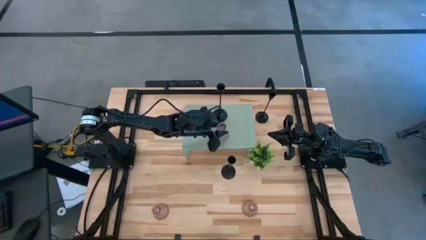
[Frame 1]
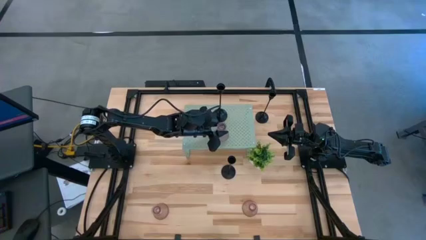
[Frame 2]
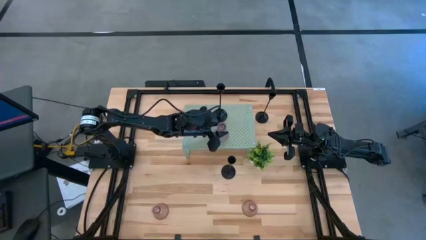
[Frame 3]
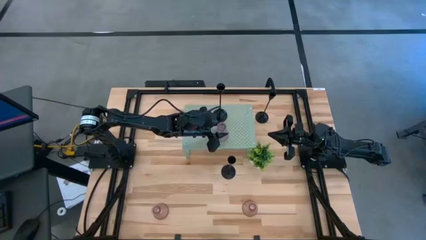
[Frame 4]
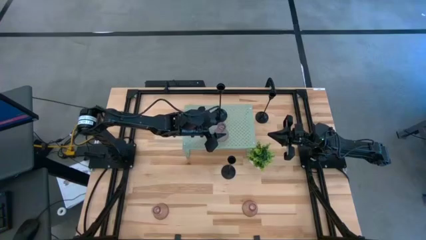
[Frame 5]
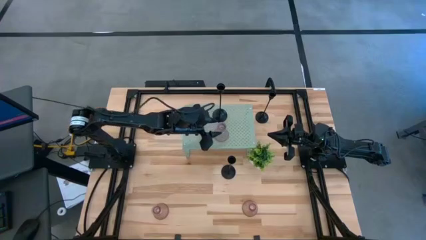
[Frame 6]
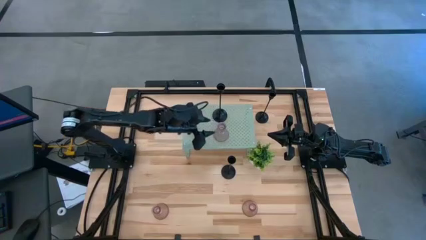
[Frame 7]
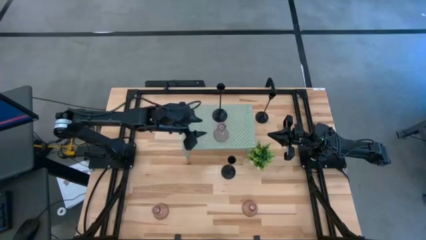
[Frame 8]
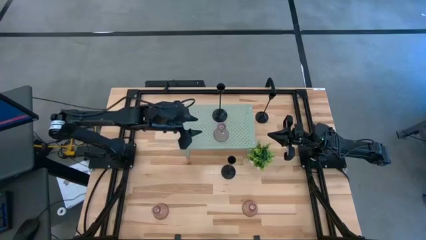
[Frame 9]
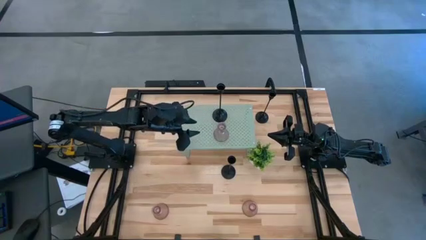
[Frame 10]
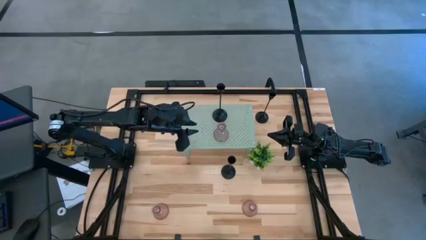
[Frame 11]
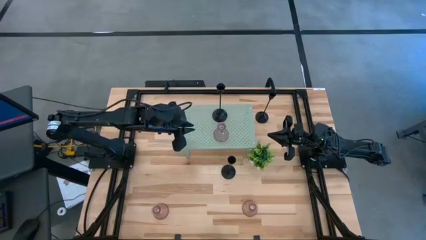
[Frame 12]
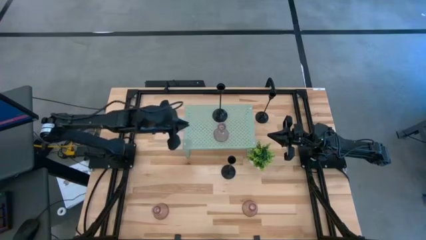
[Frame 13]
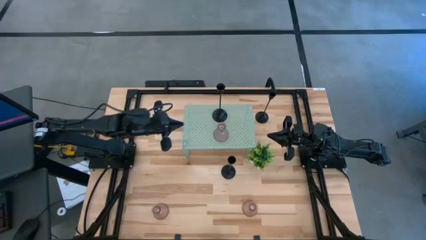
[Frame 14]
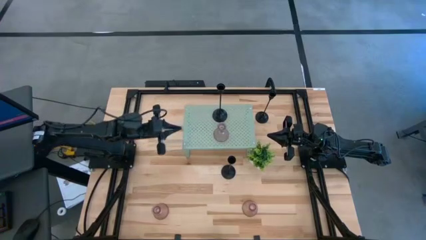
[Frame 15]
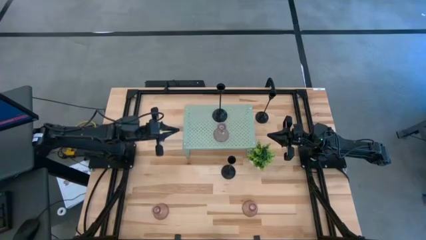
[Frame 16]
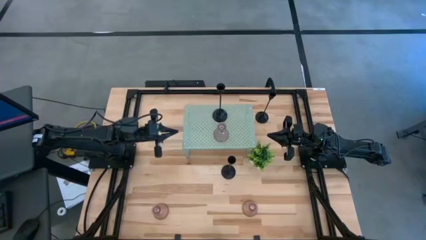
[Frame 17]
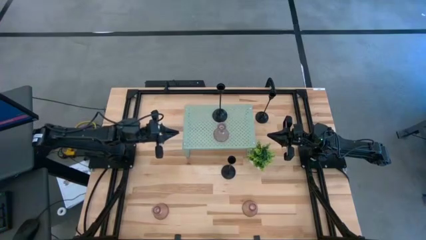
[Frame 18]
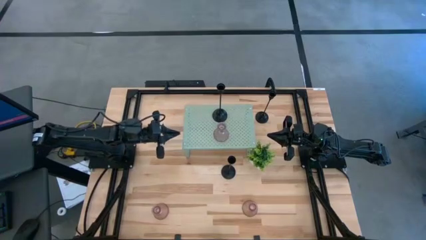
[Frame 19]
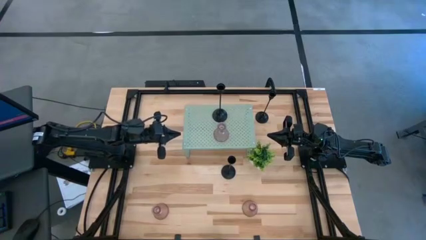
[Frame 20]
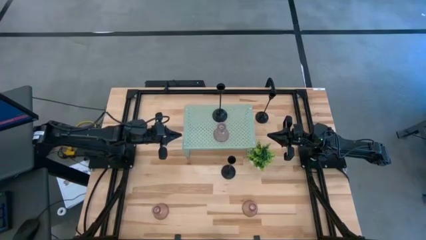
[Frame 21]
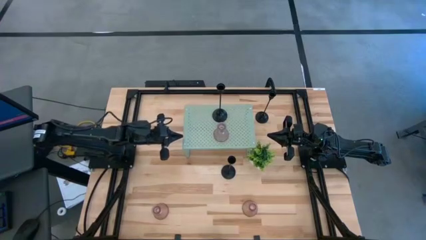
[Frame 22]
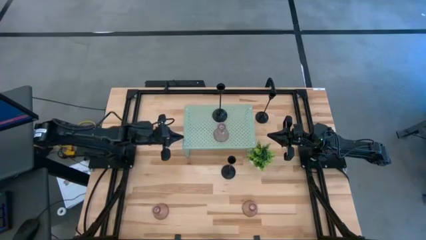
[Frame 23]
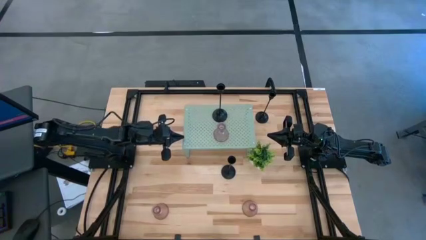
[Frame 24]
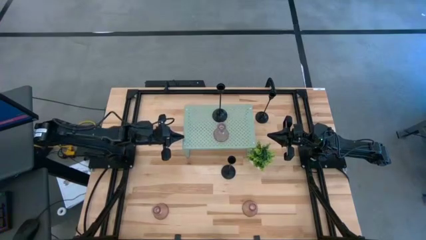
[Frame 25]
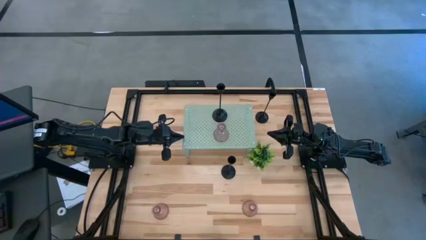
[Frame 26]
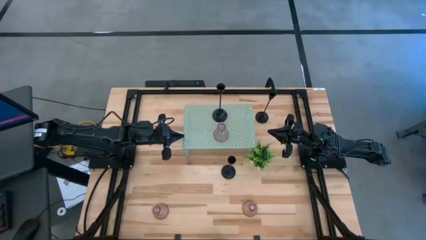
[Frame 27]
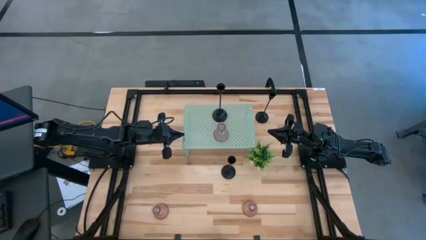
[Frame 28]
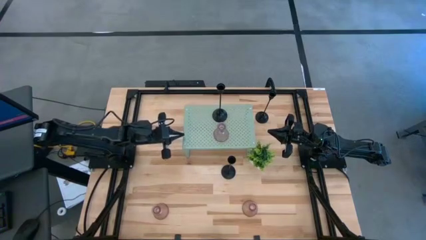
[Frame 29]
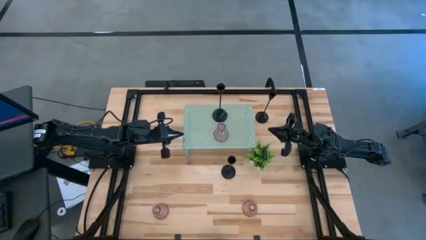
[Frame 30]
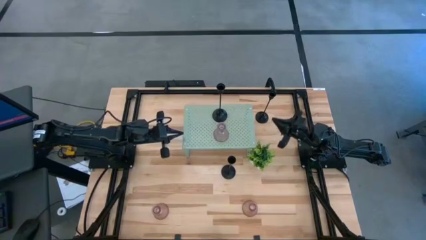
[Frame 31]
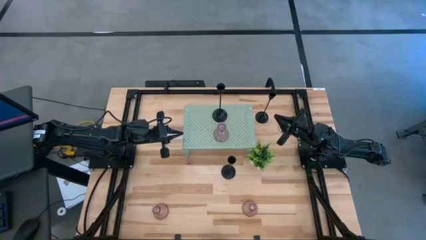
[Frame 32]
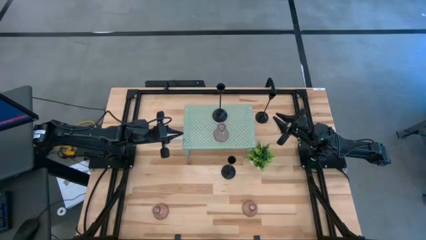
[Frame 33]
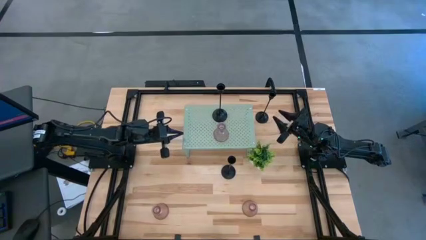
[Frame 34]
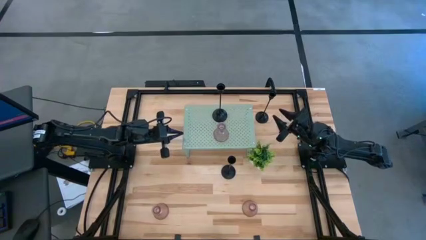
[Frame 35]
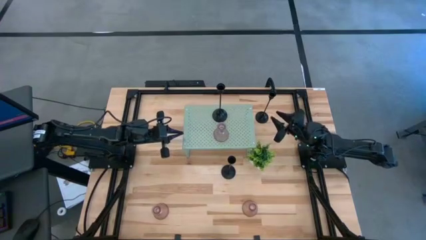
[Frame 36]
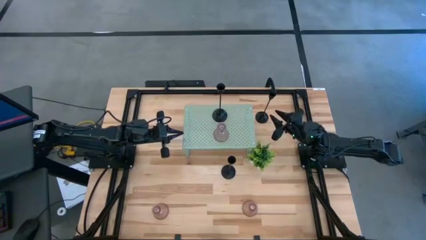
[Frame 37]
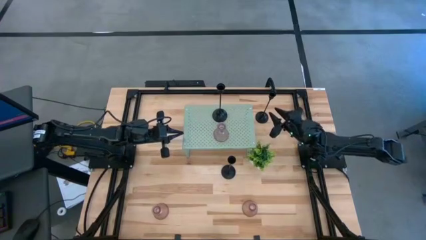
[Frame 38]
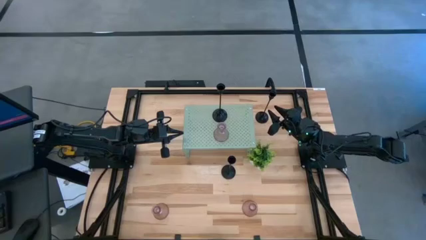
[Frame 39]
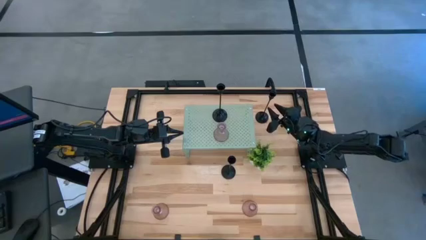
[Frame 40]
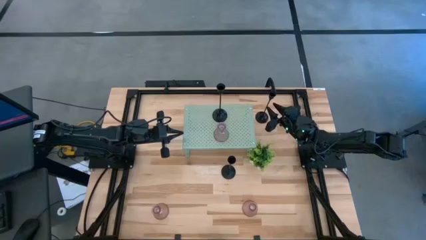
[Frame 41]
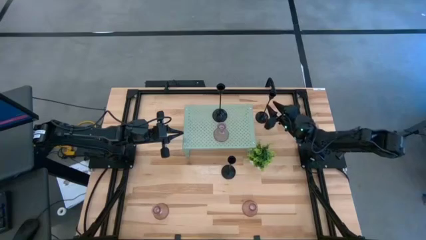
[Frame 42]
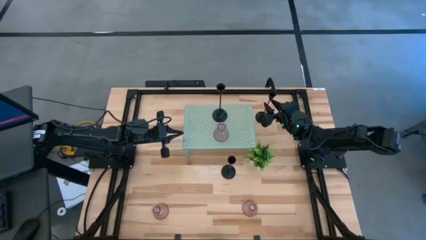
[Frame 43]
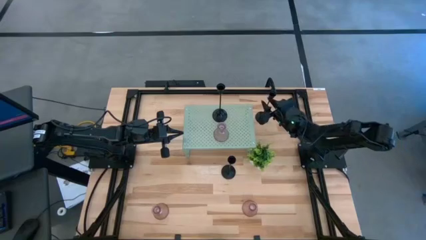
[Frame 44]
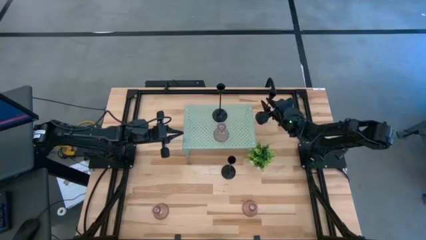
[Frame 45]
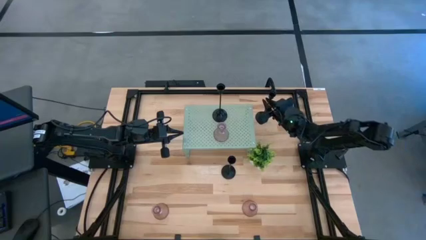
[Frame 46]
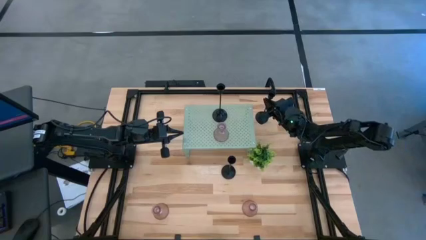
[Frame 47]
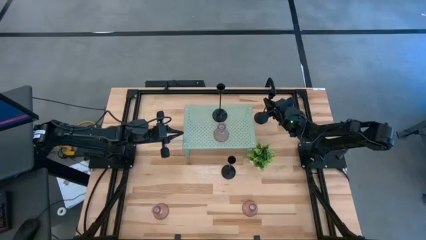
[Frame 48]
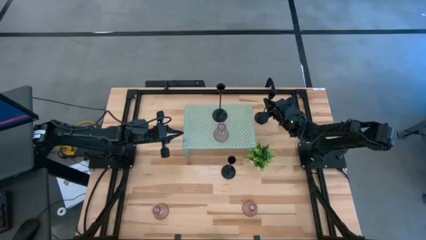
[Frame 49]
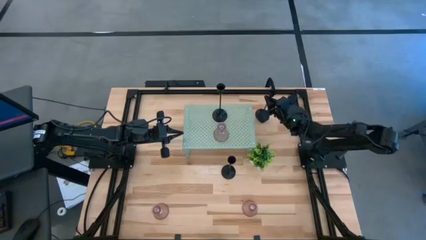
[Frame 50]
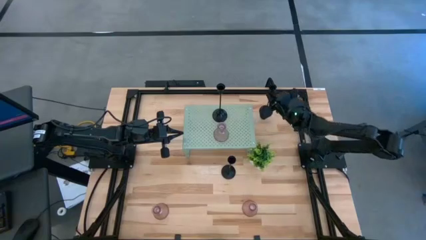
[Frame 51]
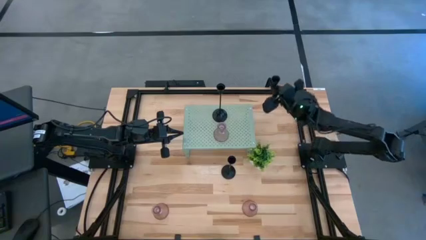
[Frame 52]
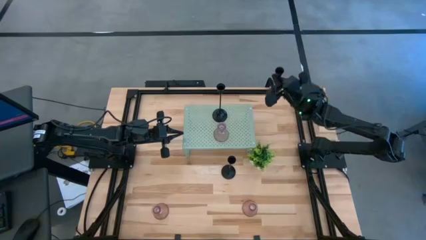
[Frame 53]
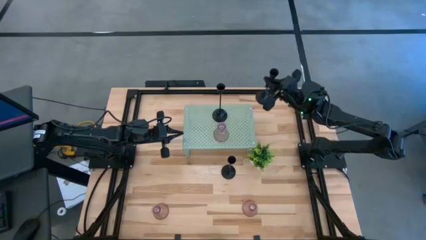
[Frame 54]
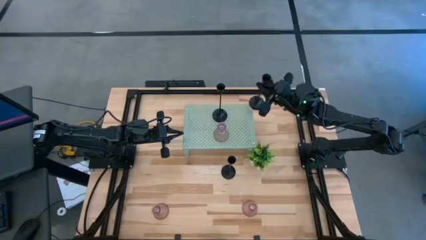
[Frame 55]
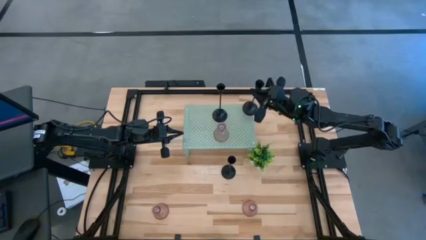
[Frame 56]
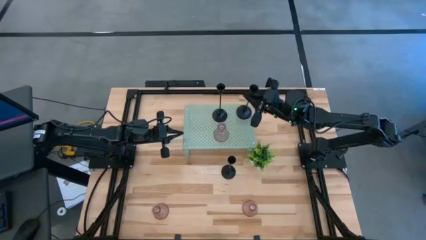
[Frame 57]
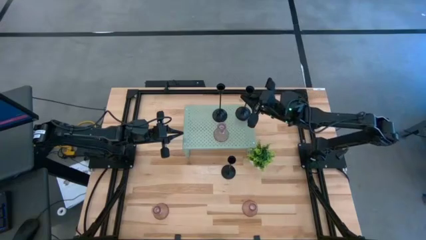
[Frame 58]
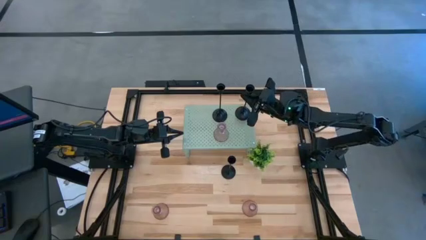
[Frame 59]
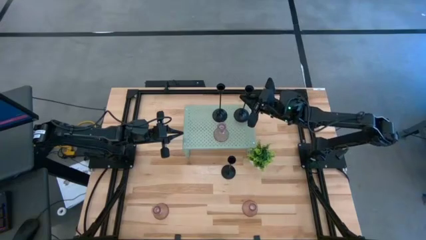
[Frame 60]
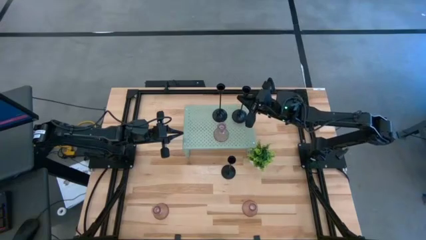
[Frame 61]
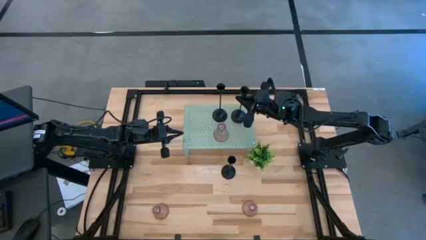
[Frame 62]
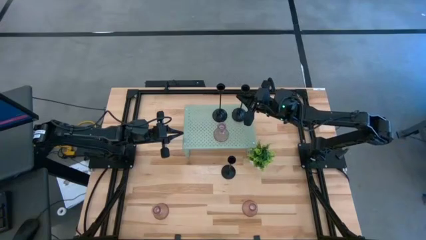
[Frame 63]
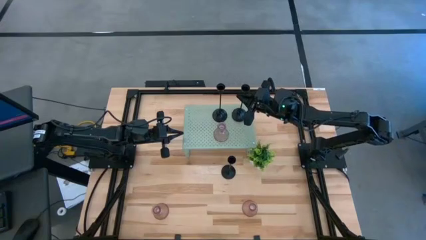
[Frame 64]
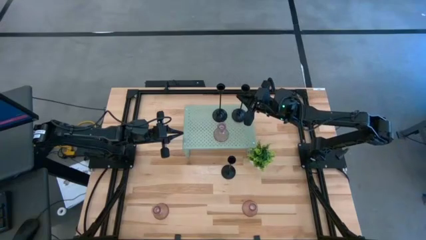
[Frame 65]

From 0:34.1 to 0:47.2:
Task: Pick & Place candle stick holders
Align the top black candle holder on the shelf with the black candle holder
